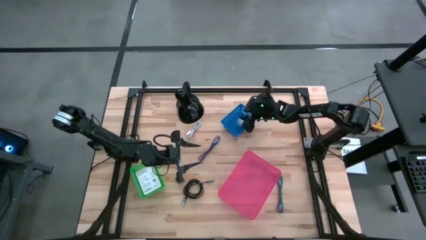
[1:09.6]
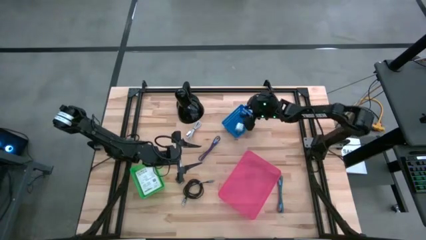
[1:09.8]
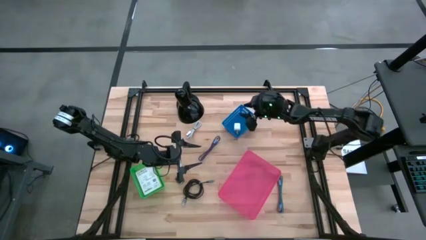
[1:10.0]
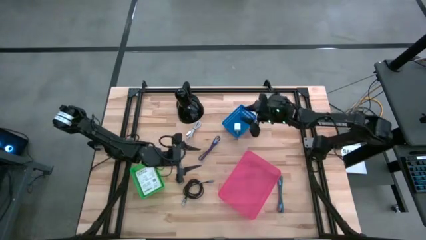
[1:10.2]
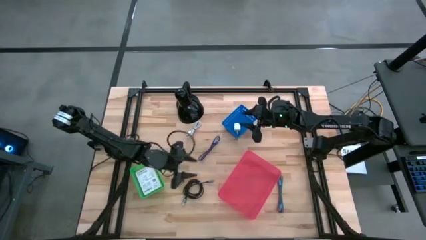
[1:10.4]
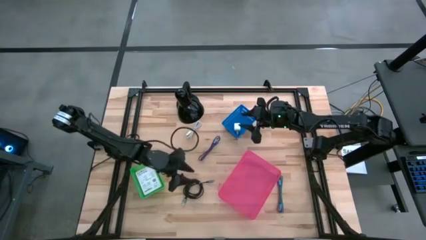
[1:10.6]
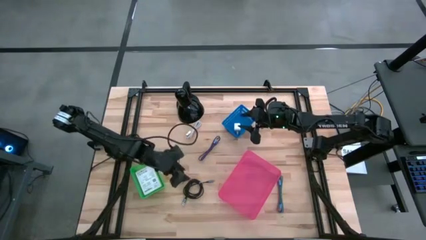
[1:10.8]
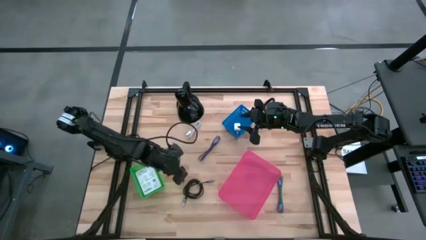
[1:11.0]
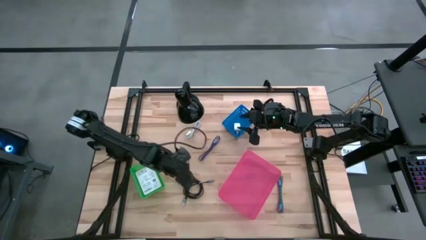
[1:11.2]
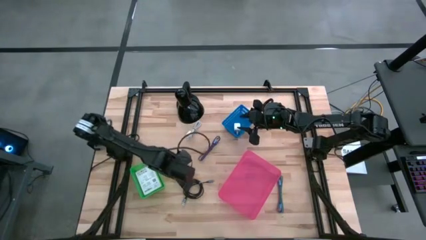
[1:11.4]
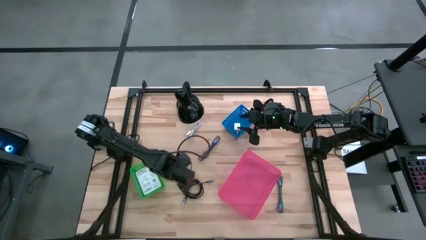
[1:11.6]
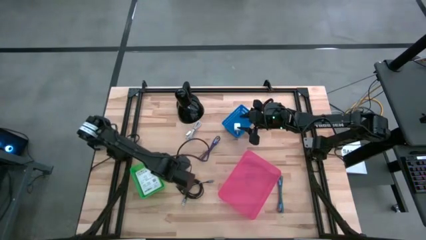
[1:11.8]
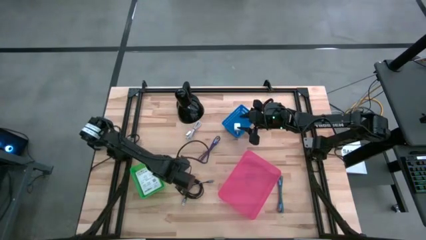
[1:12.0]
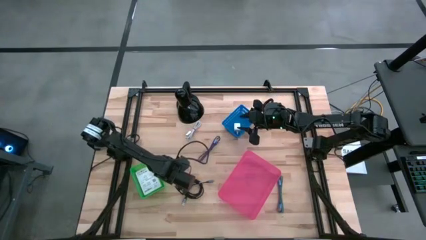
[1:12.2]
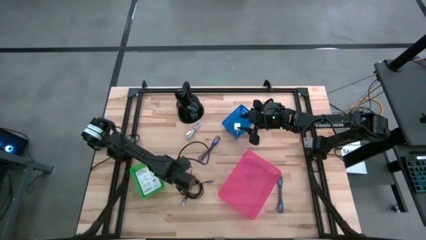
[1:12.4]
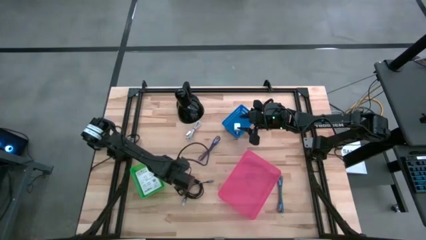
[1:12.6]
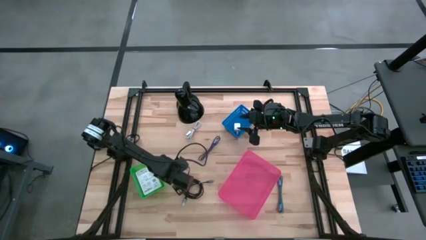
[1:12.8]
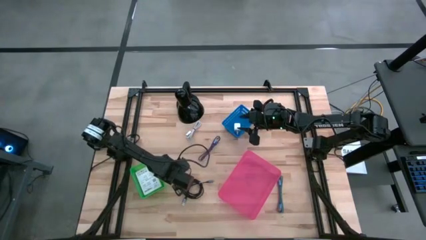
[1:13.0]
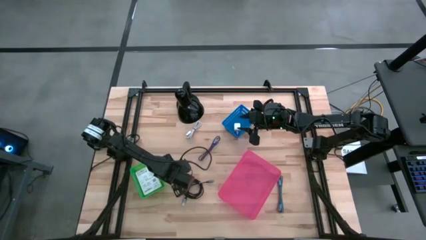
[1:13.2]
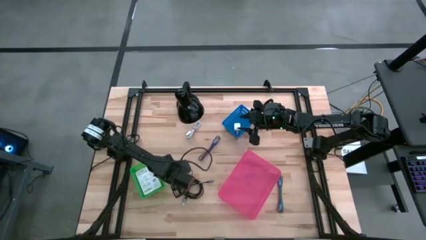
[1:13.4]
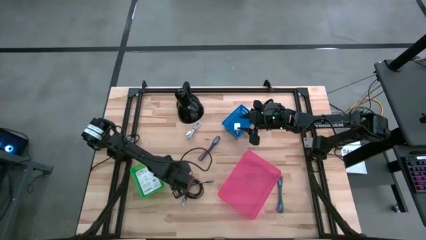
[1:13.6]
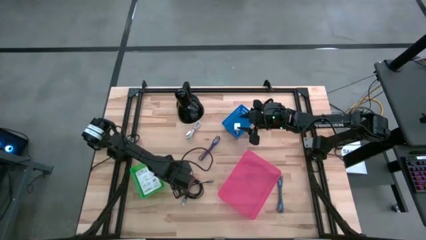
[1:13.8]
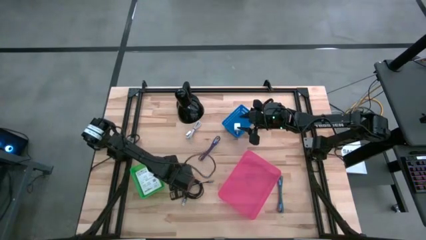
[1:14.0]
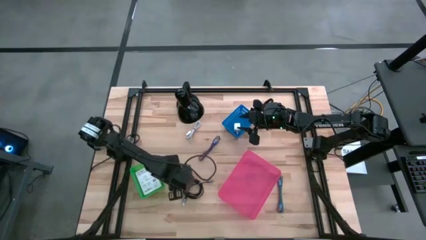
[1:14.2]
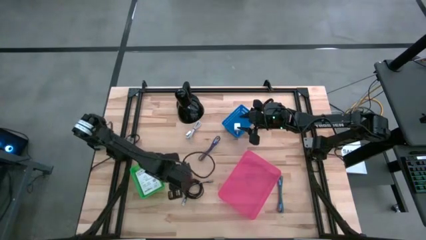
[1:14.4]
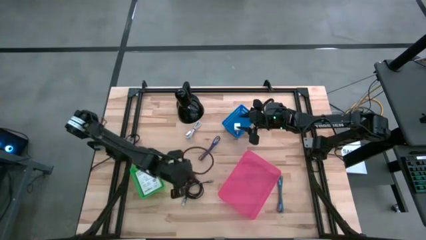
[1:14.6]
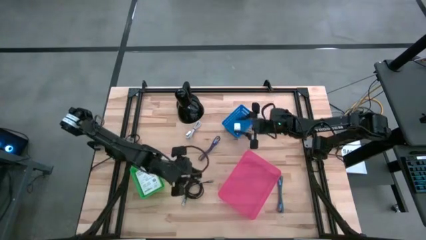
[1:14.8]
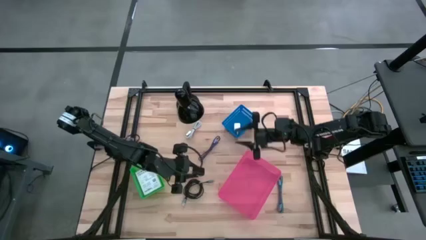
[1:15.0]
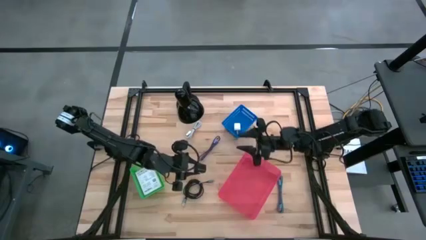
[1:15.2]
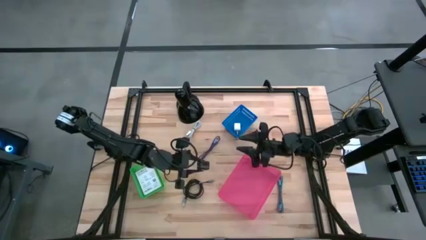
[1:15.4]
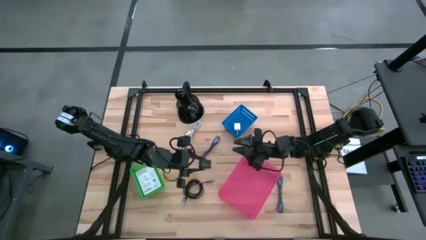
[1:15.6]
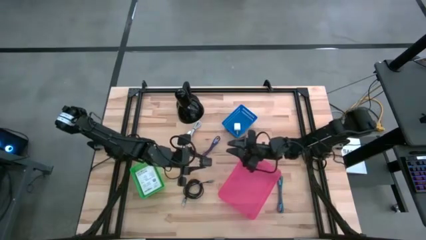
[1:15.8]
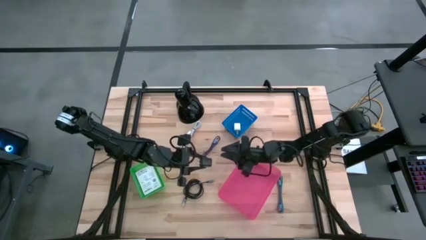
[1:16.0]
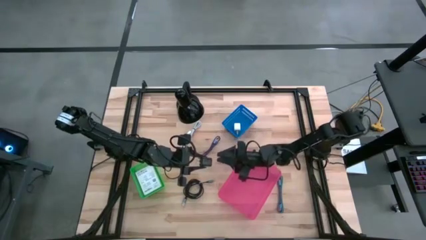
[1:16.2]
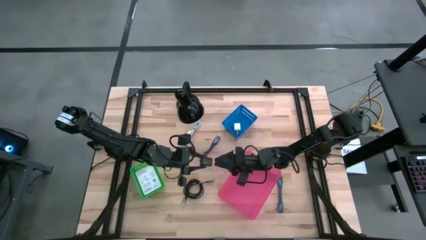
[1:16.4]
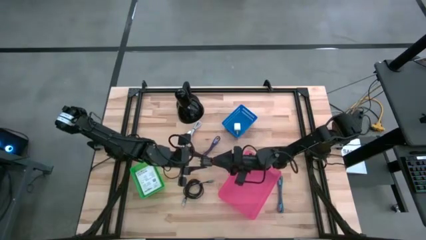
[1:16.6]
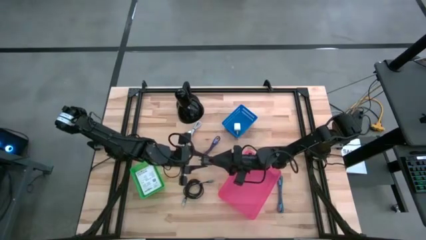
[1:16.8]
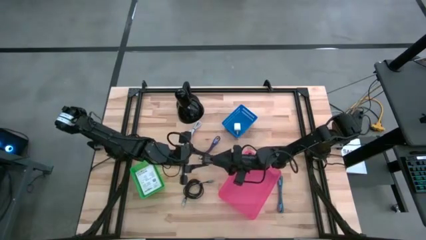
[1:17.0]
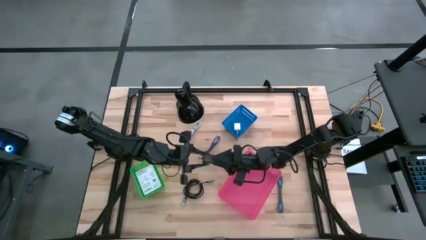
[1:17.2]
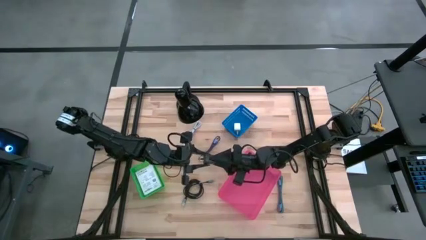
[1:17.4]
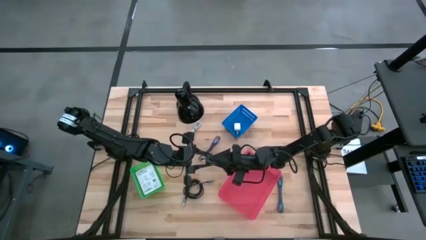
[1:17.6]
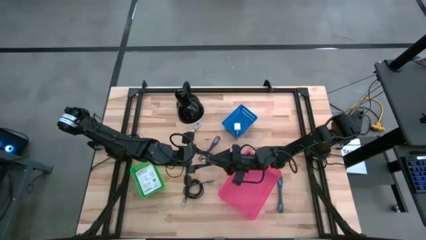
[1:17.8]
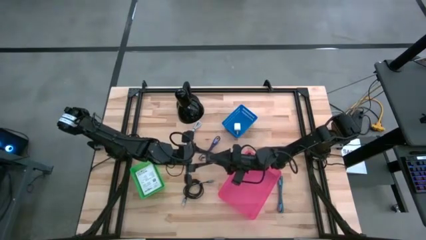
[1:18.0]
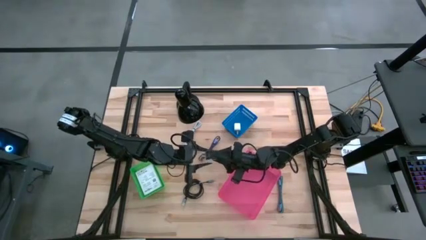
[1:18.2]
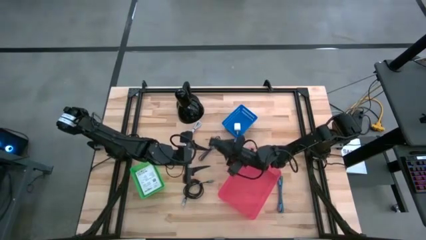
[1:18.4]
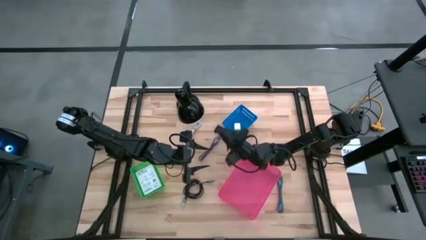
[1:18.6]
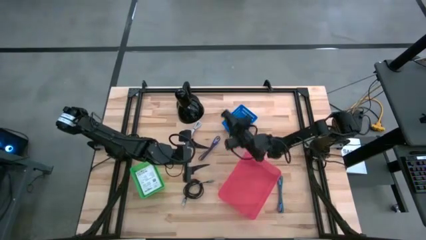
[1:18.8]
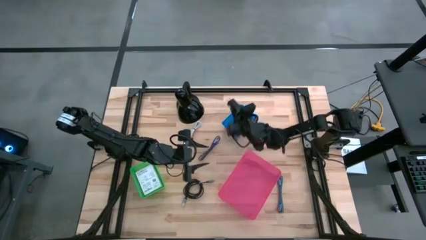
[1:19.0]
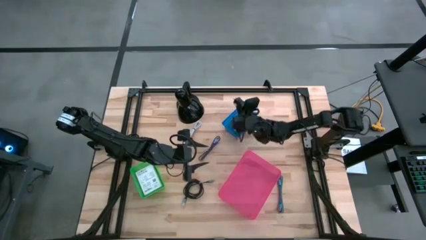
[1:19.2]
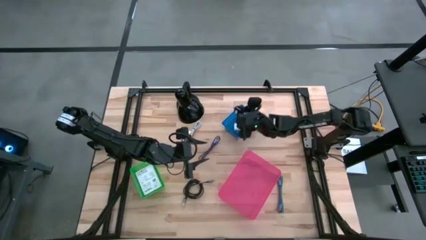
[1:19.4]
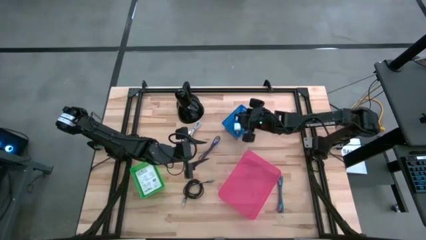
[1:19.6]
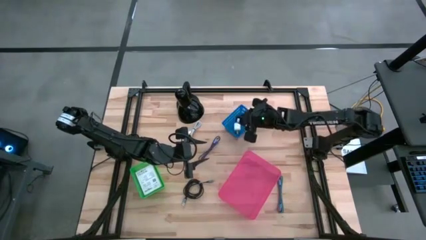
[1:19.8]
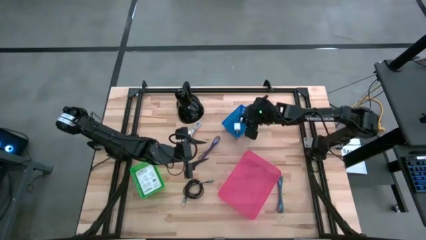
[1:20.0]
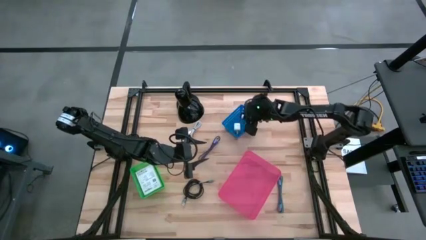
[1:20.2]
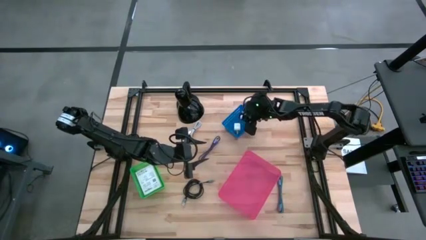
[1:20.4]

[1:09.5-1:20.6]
Task: Pick and place items into bin
Put the black charger adapter into the blue bin
